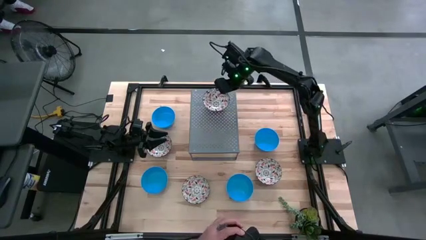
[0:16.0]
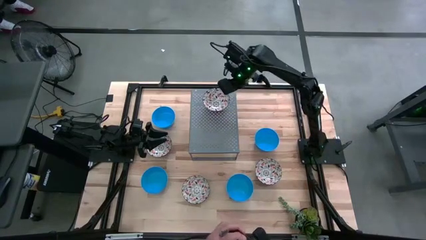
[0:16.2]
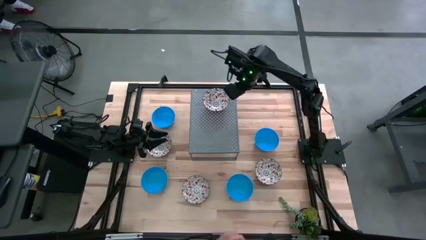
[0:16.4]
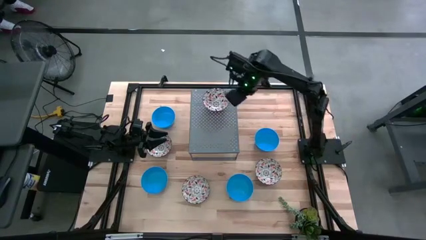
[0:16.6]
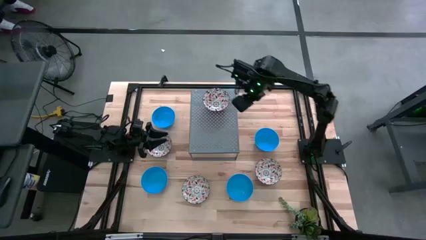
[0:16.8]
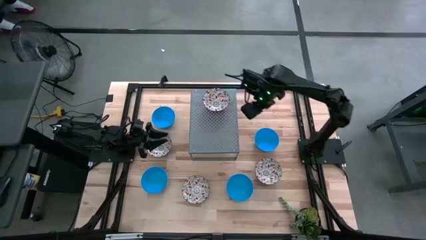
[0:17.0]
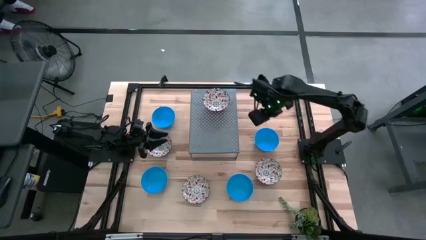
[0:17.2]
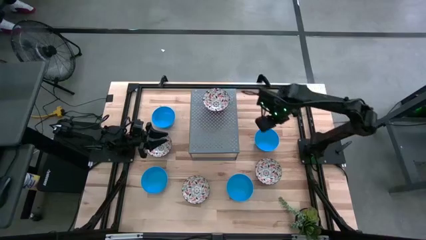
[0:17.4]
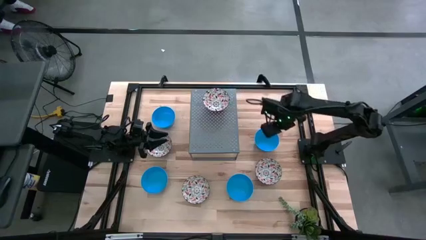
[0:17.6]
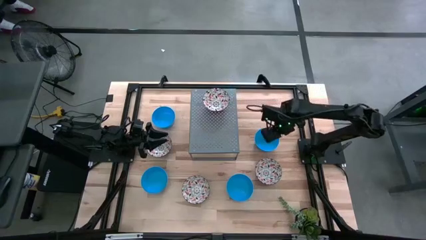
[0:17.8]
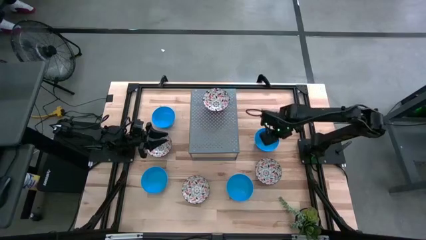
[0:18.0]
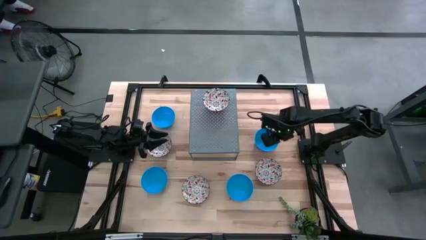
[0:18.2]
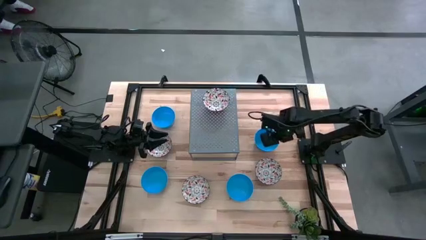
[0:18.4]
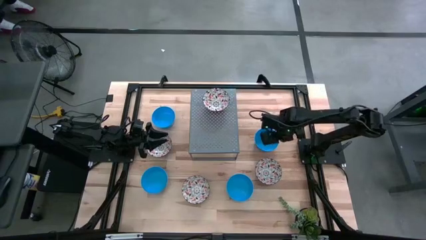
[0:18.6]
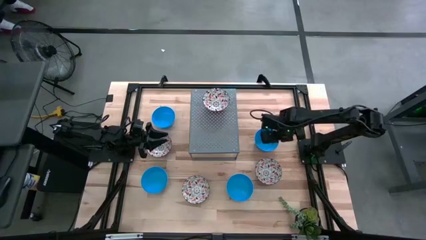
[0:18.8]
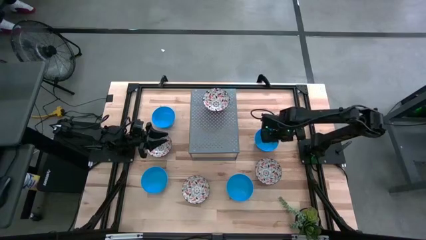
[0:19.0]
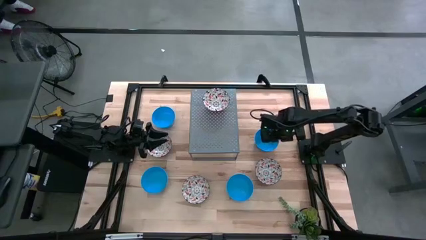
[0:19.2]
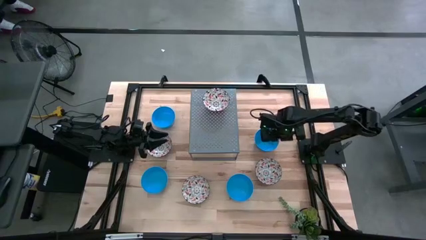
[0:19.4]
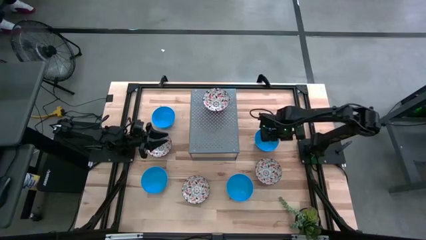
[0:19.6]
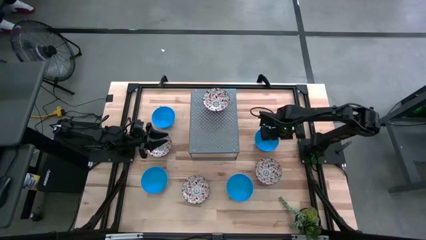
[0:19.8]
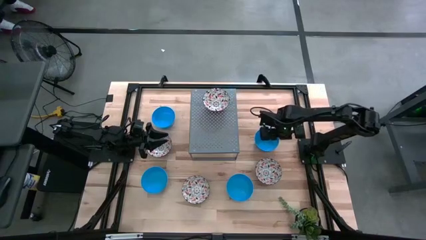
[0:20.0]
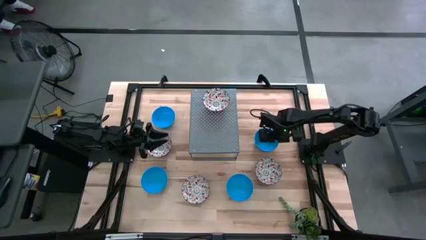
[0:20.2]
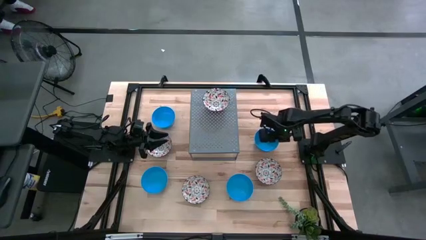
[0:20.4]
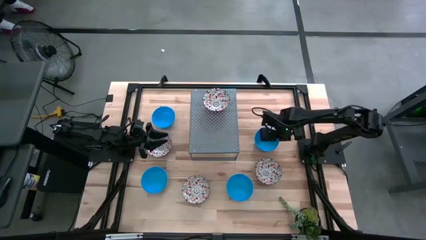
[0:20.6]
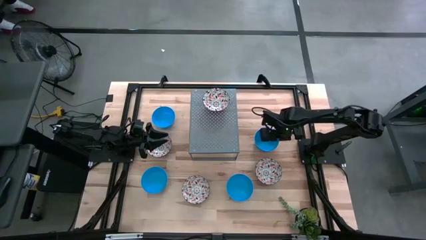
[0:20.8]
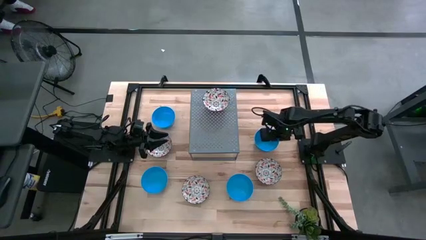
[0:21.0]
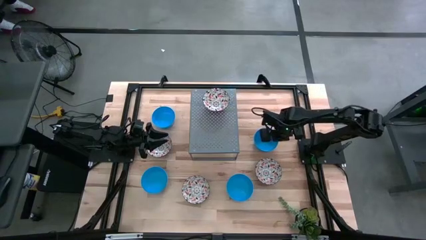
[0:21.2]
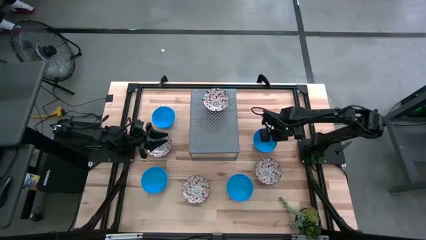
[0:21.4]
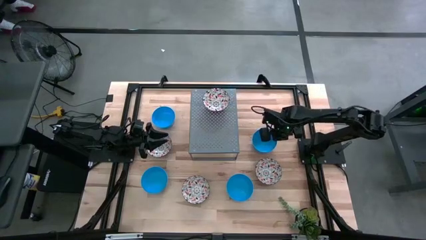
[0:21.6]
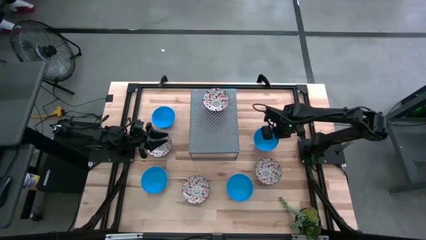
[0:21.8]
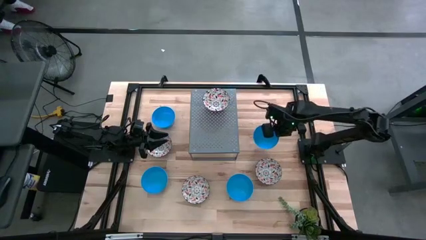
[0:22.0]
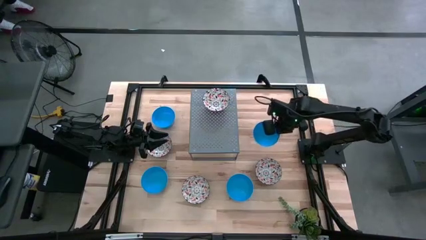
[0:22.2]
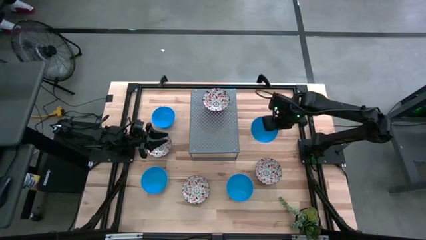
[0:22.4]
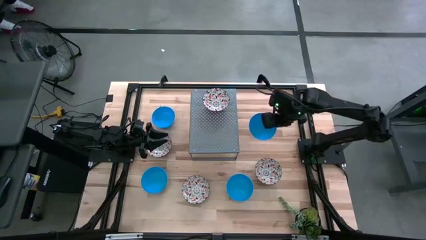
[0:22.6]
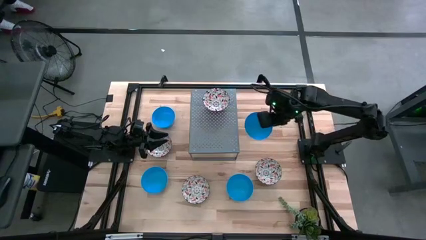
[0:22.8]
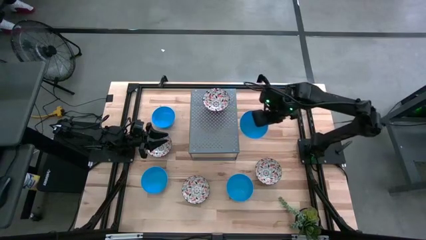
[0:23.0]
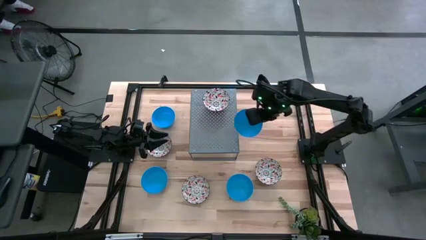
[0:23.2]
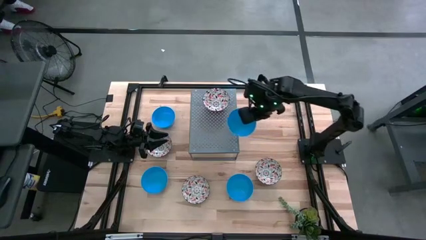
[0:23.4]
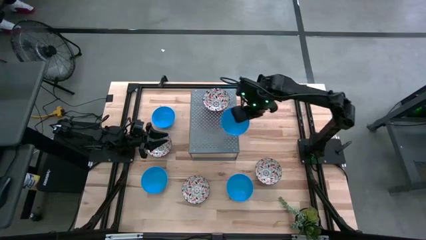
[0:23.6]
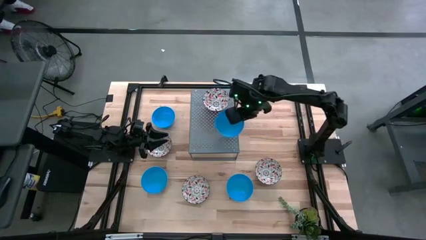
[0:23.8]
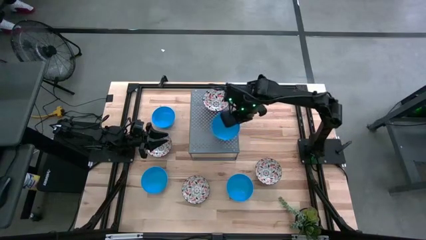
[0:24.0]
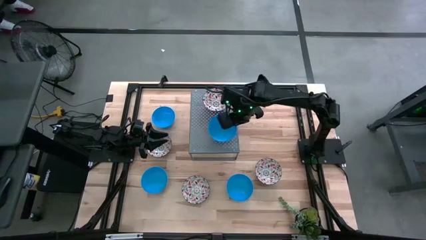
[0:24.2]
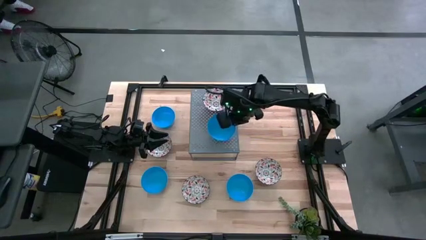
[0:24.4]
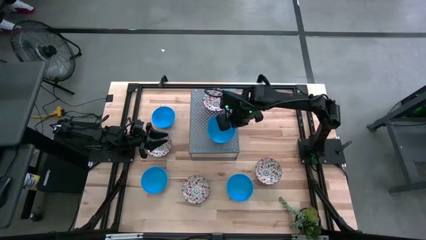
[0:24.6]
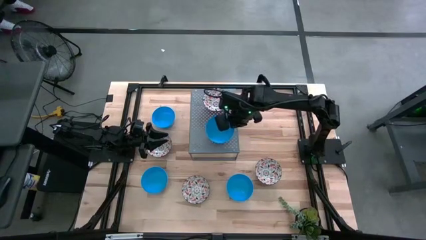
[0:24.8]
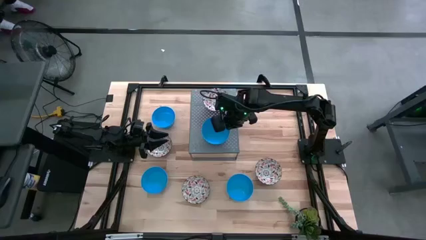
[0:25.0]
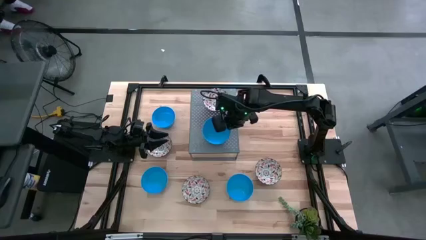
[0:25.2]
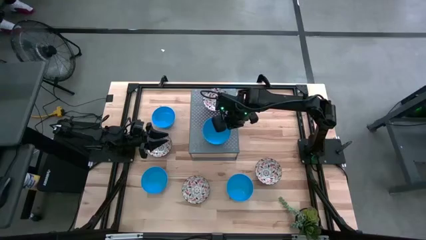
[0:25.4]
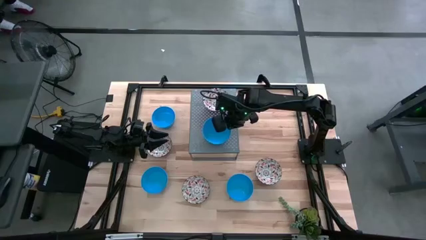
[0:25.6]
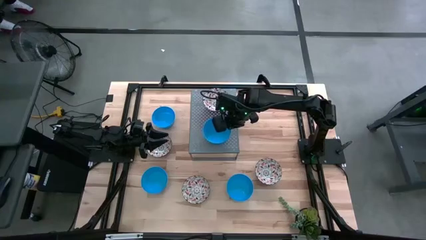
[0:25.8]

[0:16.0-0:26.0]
Task: Pick & Place Mini bowls
Put the blue bowl on the shelf
